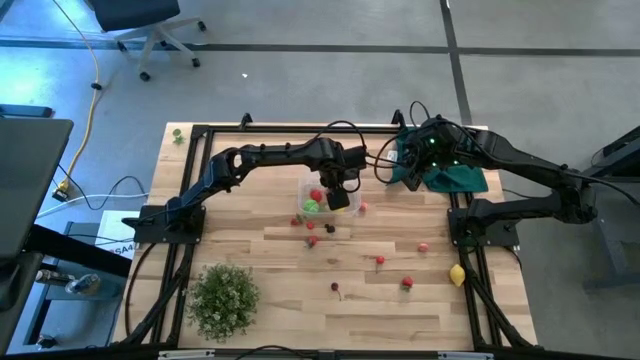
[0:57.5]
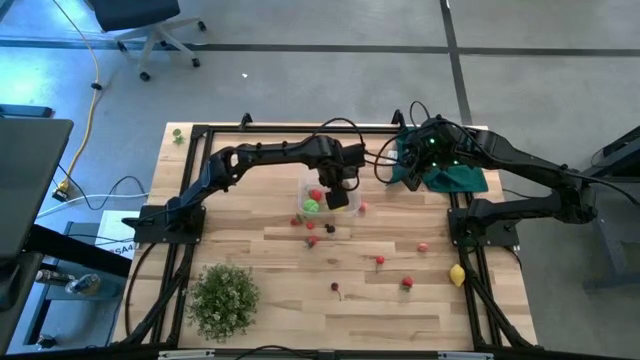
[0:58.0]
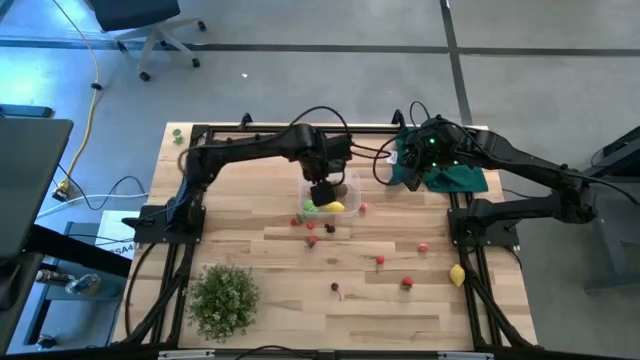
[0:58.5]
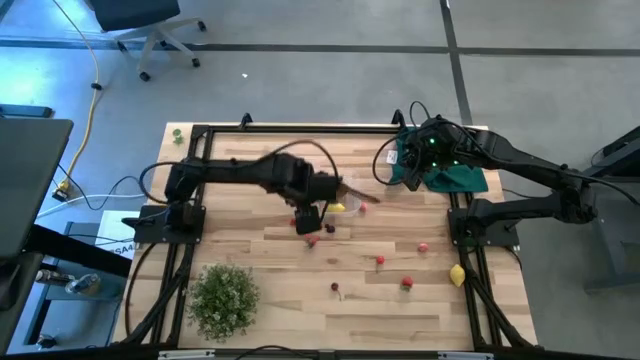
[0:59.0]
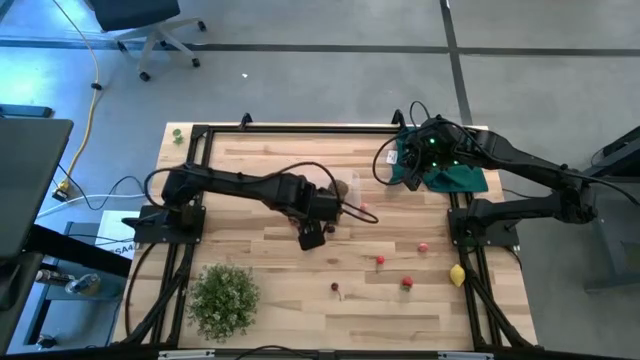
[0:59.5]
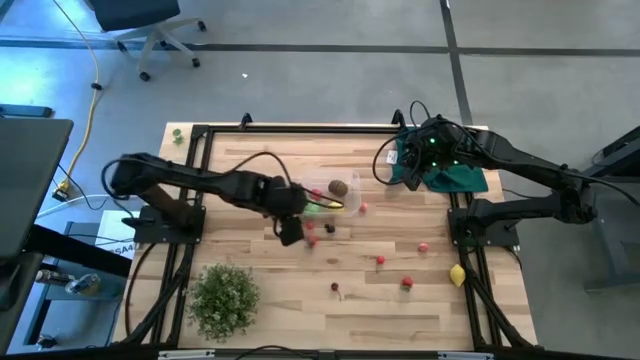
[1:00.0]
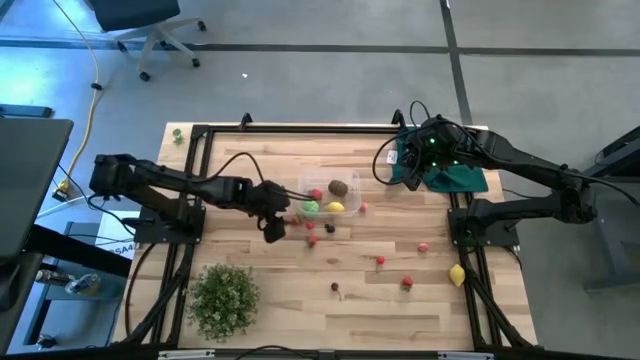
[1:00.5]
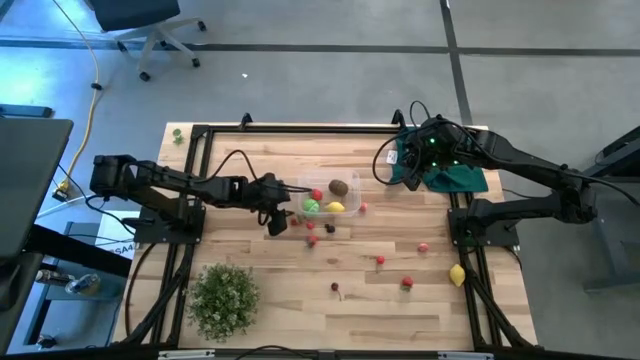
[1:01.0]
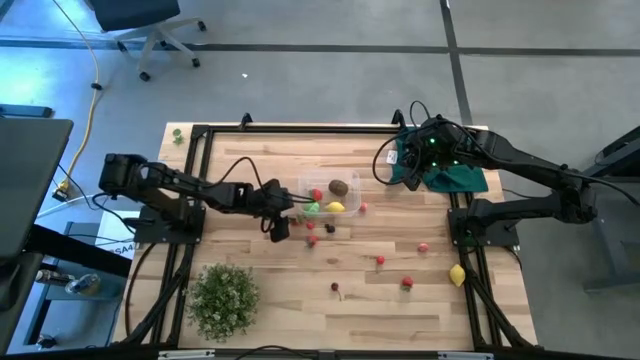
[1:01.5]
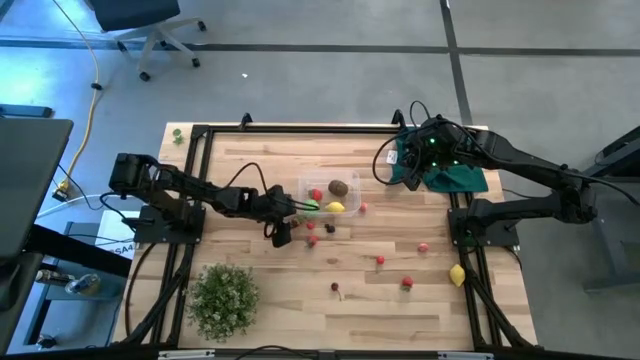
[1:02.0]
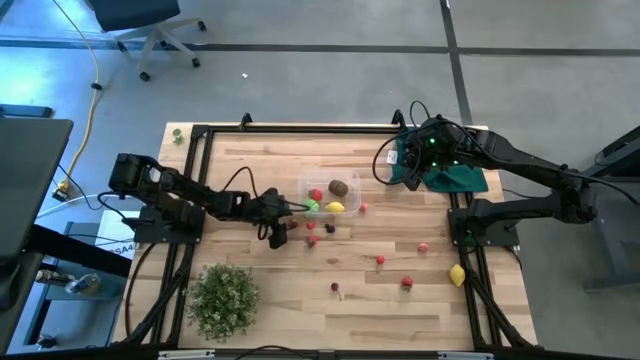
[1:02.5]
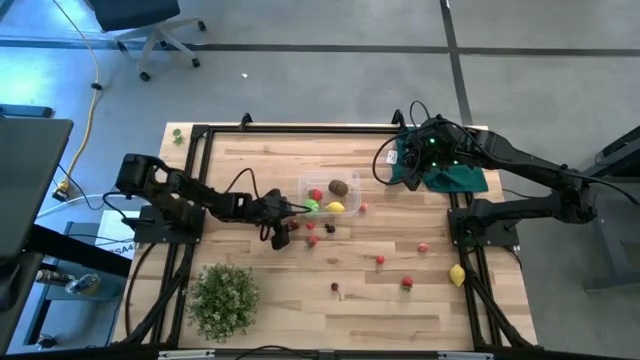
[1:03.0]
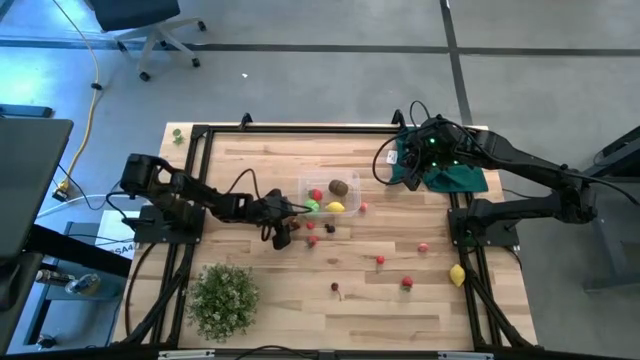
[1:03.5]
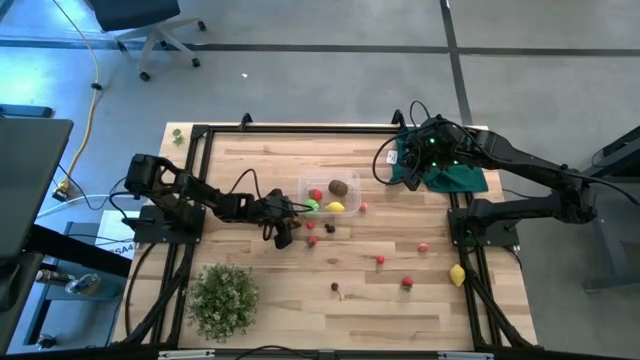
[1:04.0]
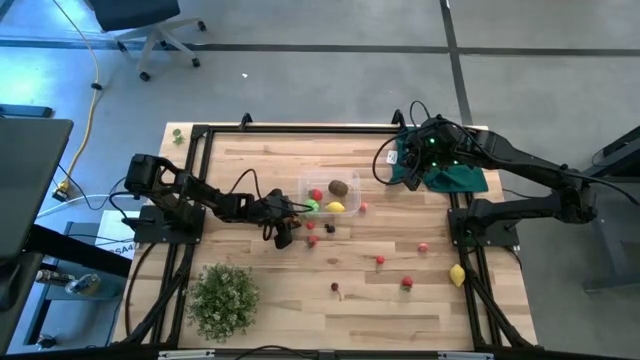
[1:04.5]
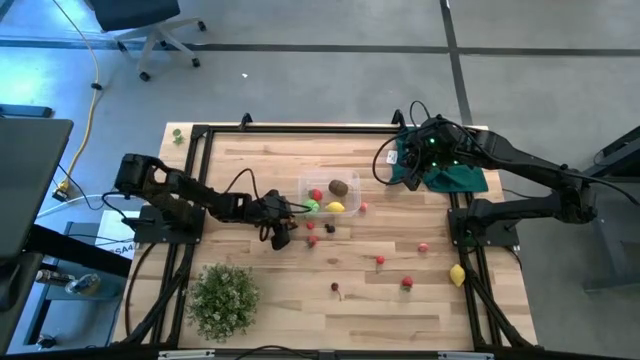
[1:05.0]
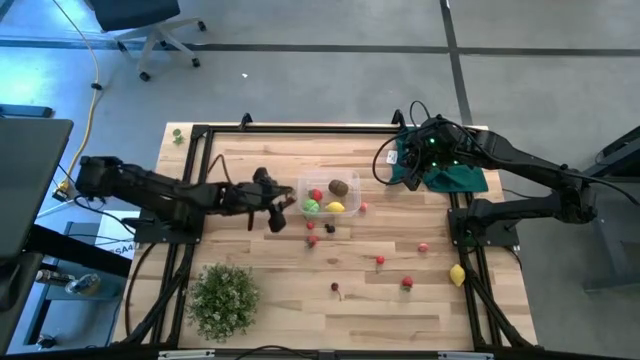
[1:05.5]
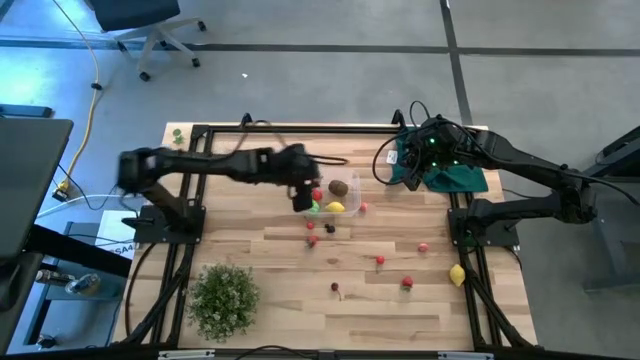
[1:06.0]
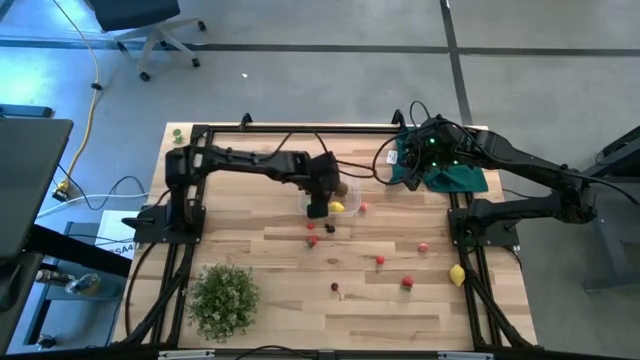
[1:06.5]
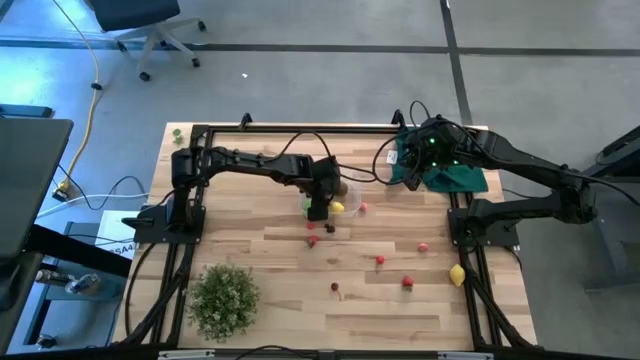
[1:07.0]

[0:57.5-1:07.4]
Task: Pick and placing Produce into tupperware
Put the red strawberry into the transparent bin

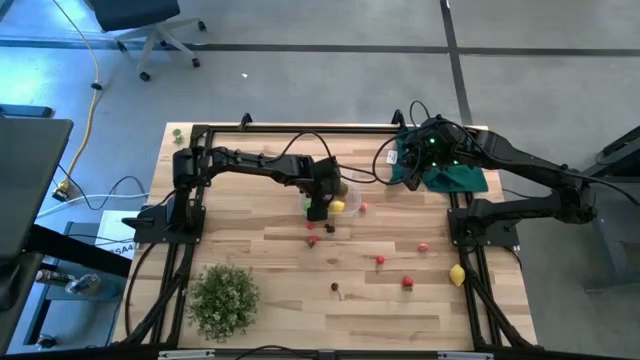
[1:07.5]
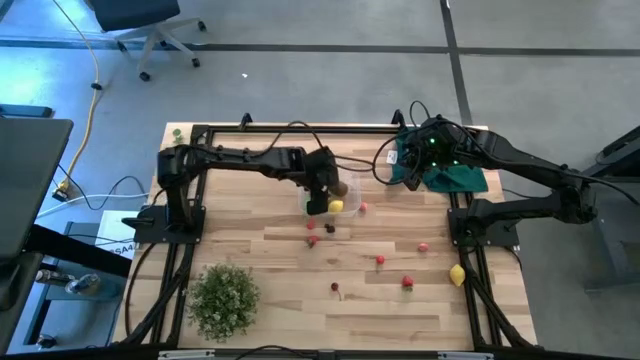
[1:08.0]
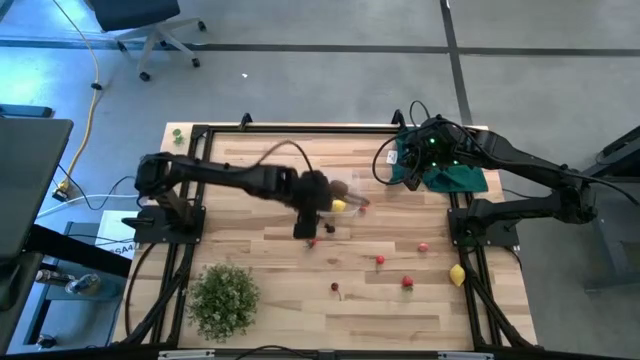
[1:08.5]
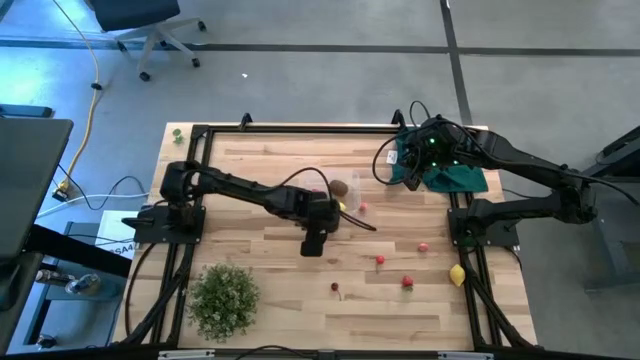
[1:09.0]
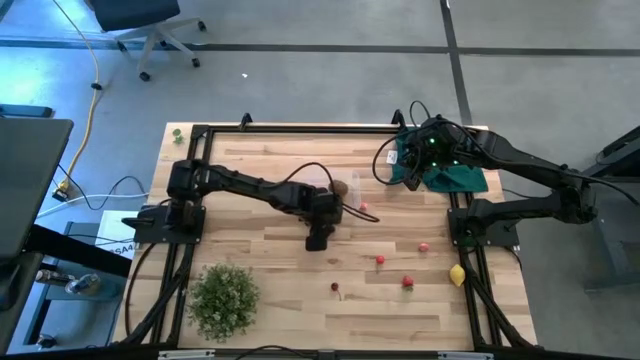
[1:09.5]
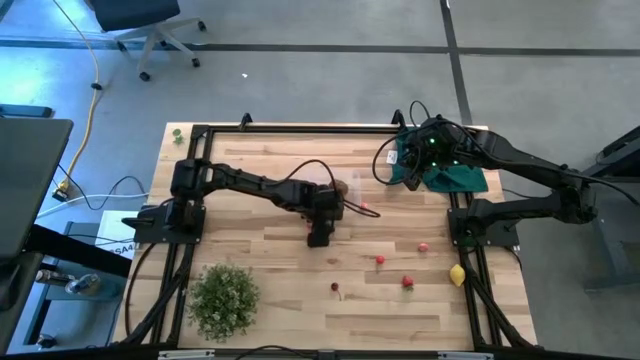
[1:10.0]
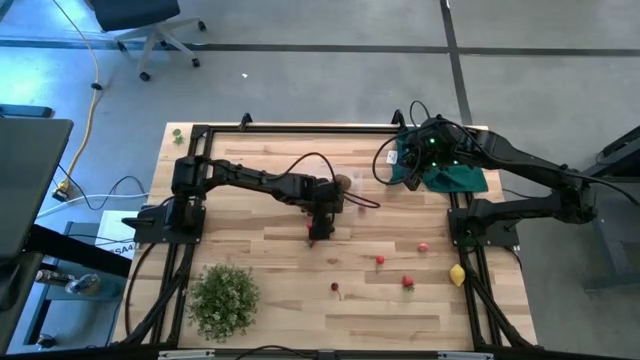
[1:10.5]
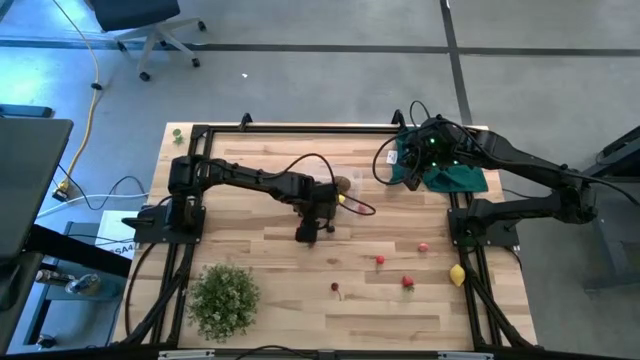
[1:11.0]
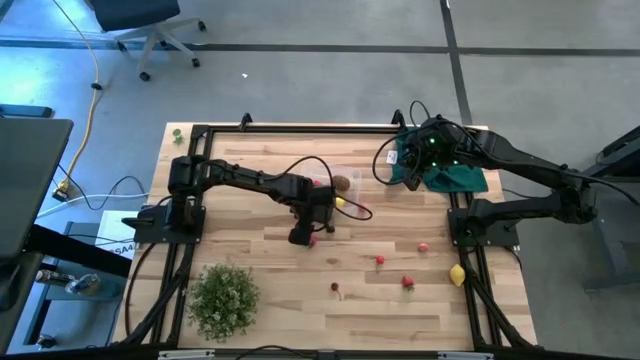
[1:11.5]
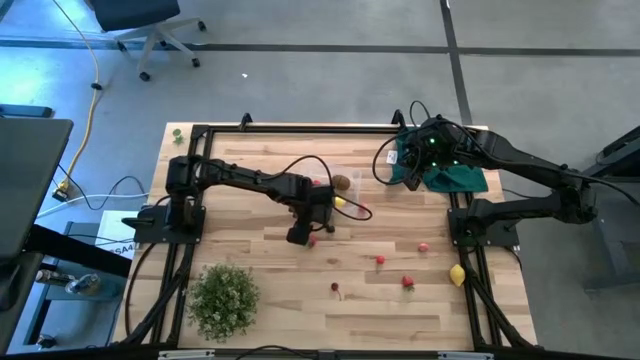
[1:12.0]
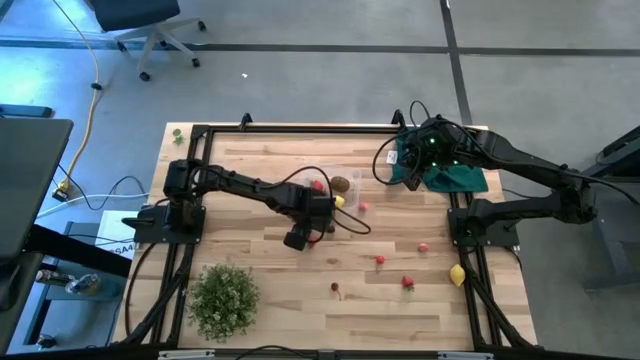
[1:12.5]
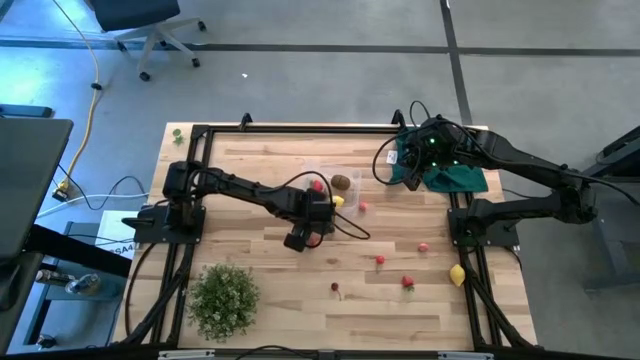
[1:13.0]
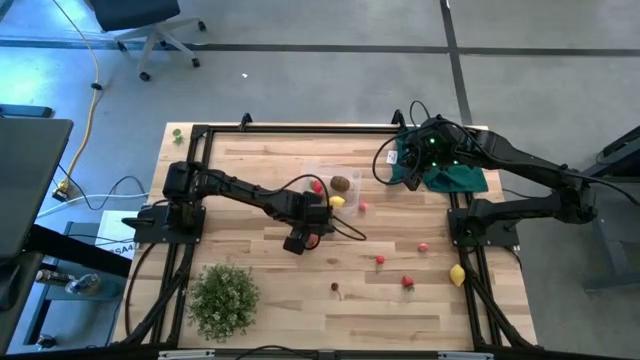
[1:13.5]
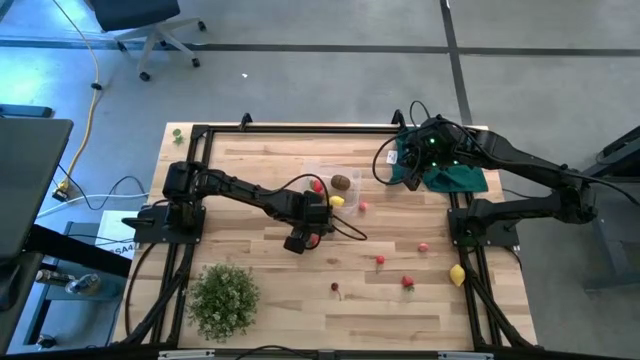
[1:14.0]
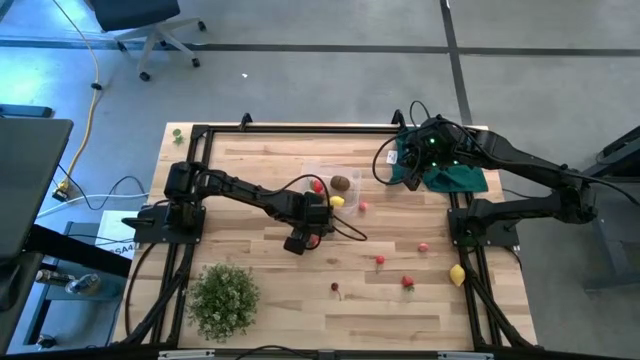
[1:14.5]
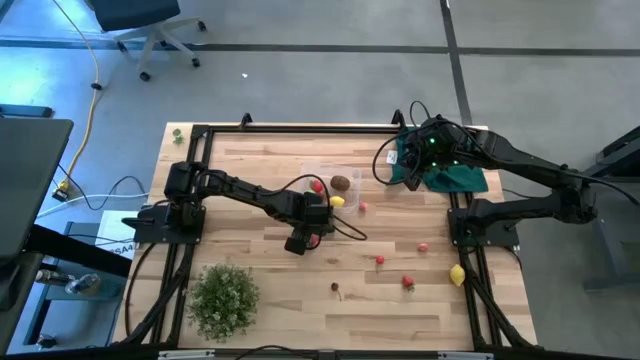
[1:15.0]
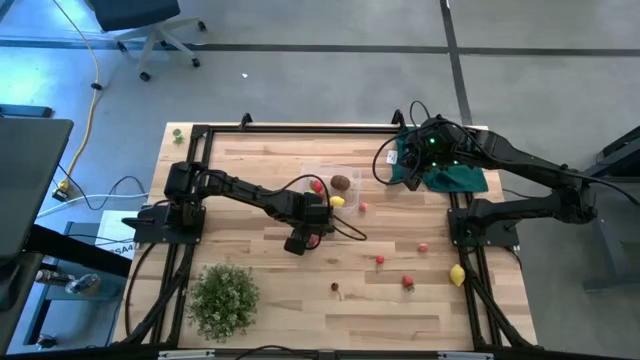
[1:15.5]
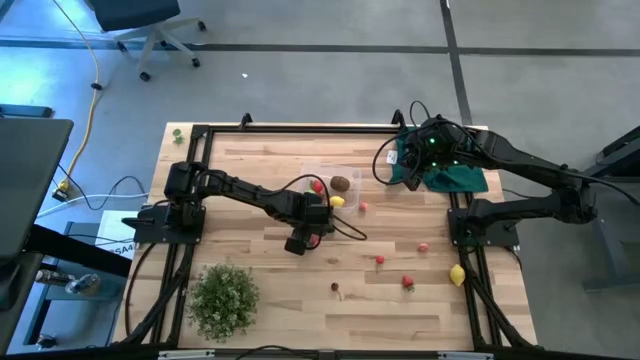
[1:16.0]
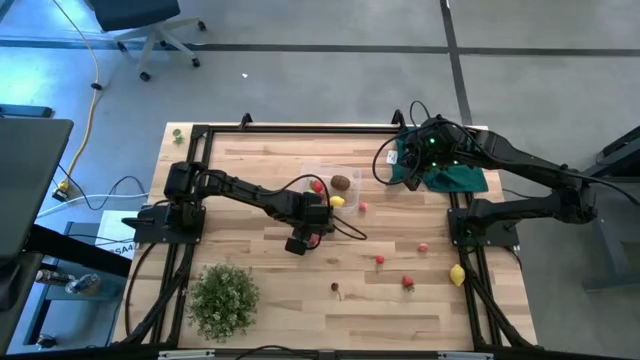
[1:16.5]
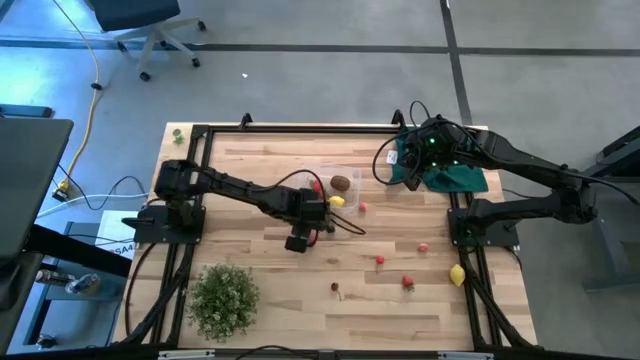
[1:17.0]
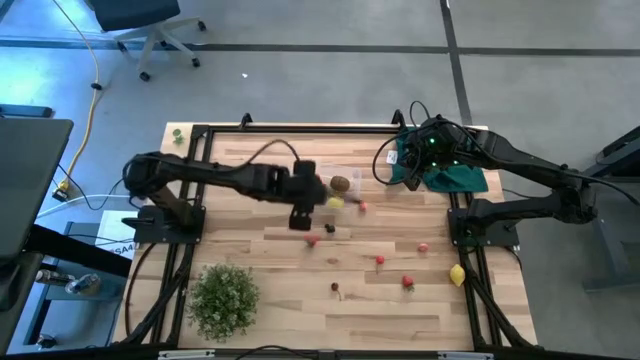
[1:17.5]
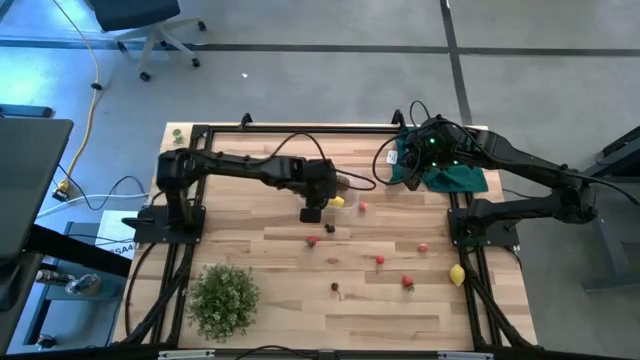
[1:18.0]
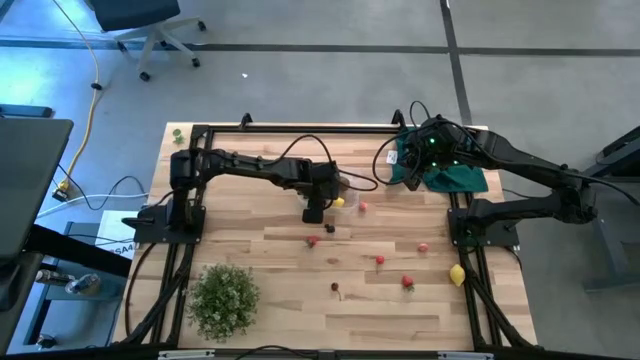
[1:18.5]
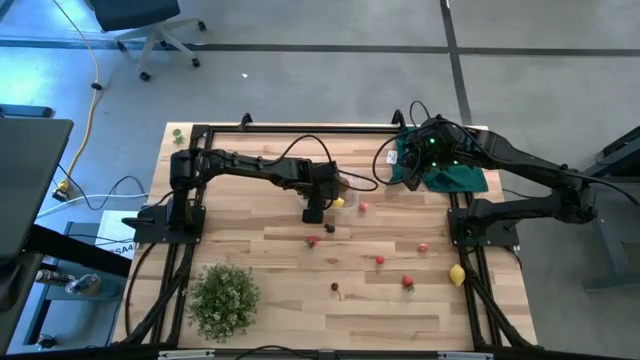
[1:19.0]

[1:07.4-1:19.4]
Put the red cherry into the transparent bin
